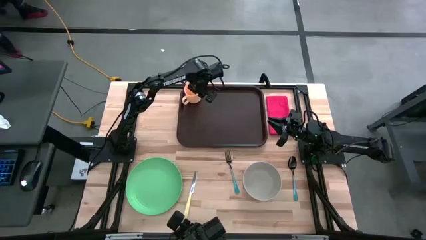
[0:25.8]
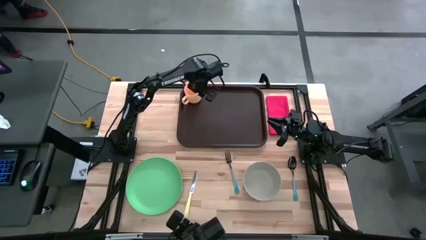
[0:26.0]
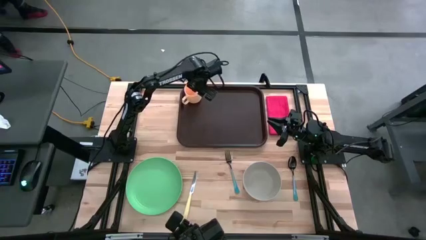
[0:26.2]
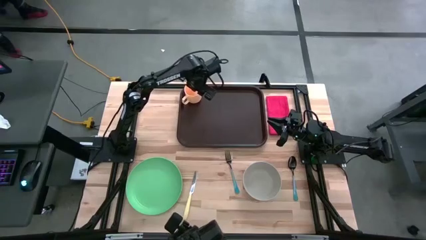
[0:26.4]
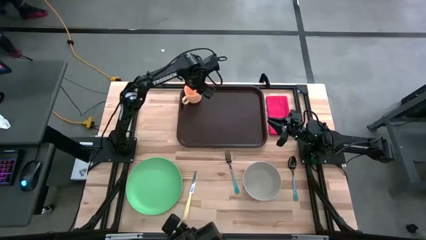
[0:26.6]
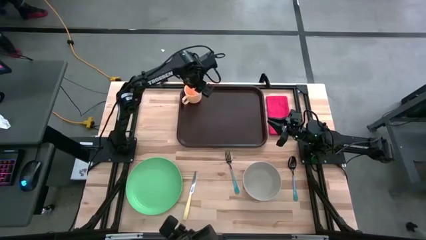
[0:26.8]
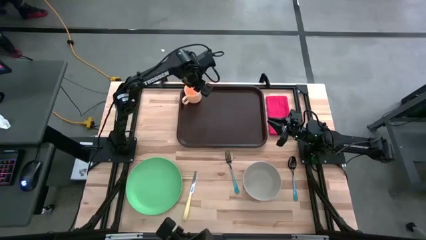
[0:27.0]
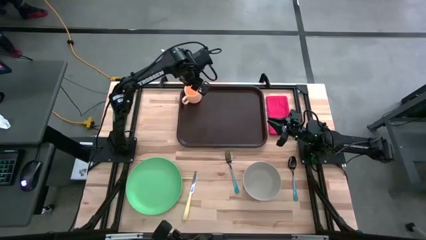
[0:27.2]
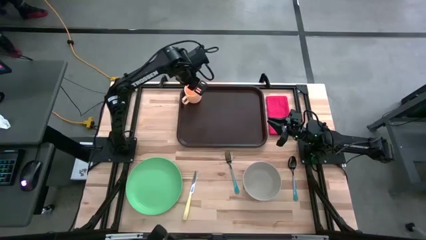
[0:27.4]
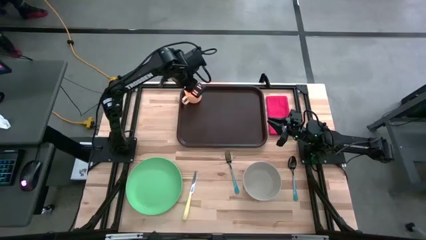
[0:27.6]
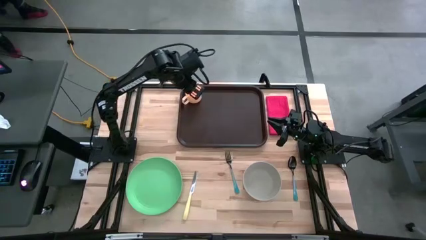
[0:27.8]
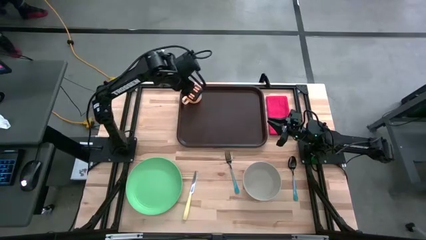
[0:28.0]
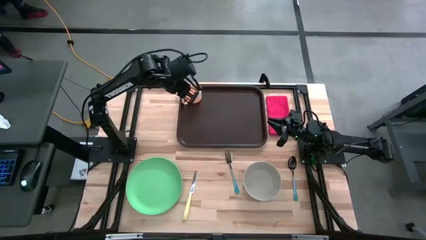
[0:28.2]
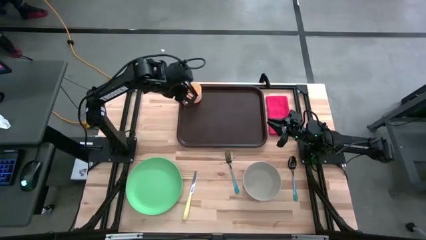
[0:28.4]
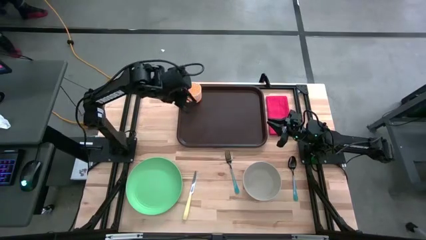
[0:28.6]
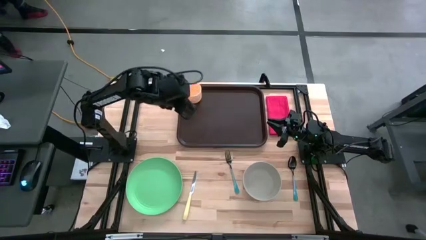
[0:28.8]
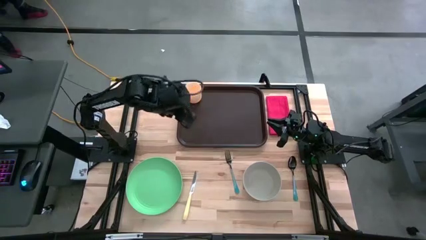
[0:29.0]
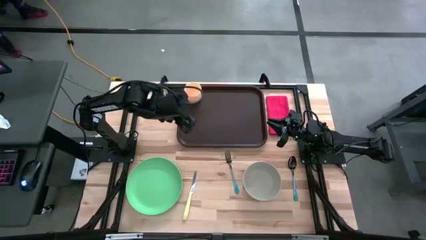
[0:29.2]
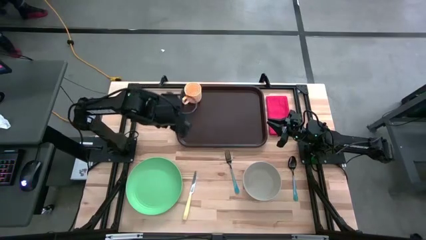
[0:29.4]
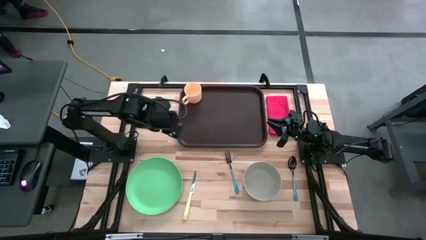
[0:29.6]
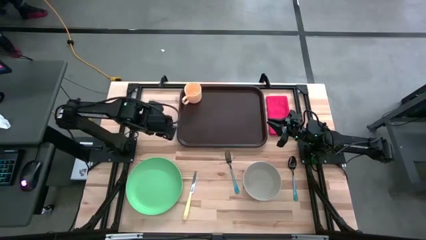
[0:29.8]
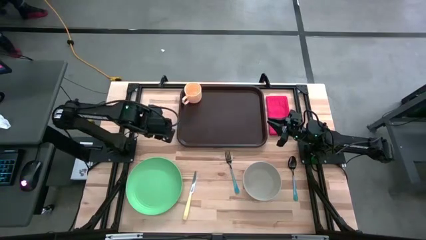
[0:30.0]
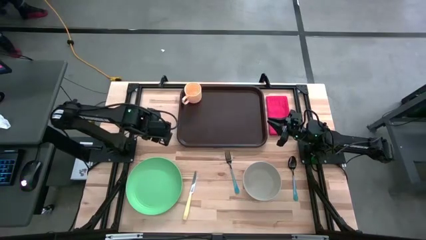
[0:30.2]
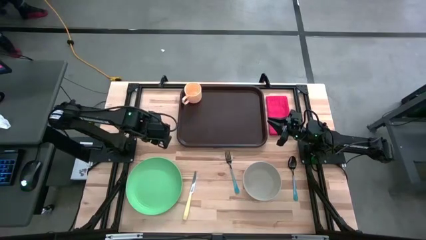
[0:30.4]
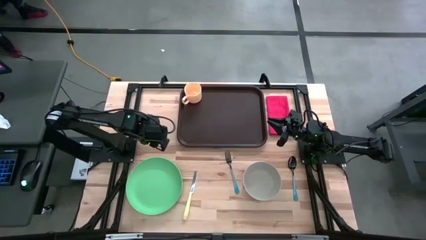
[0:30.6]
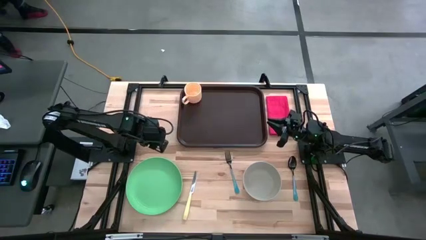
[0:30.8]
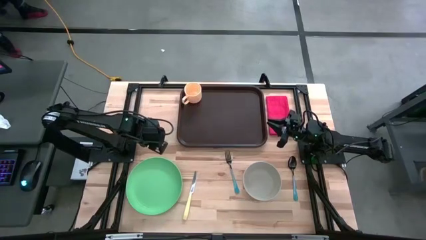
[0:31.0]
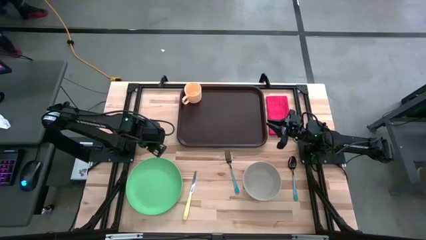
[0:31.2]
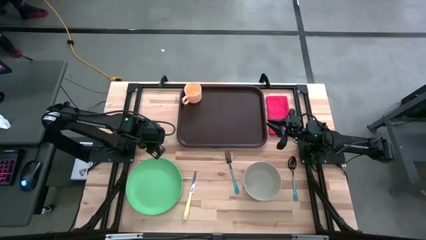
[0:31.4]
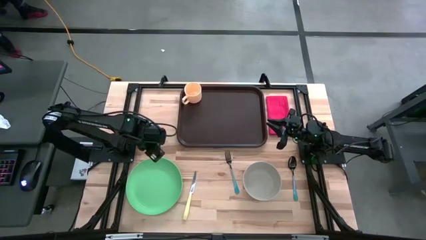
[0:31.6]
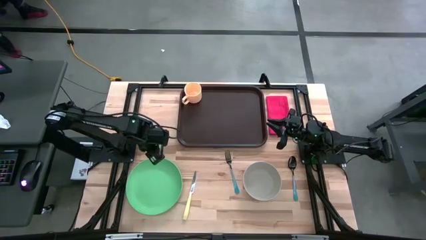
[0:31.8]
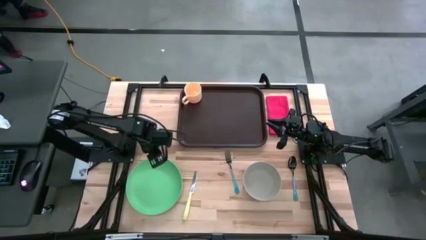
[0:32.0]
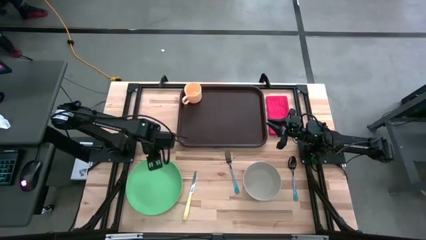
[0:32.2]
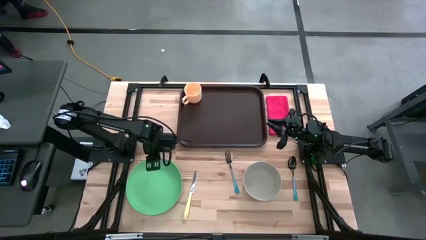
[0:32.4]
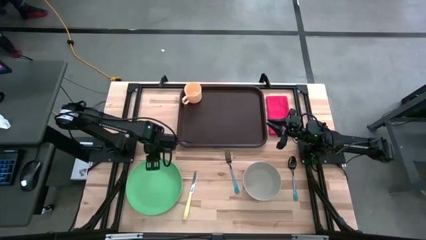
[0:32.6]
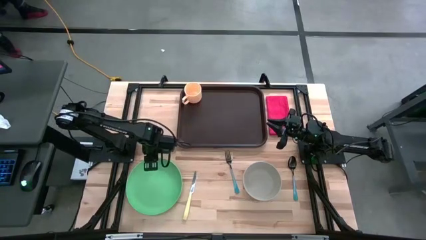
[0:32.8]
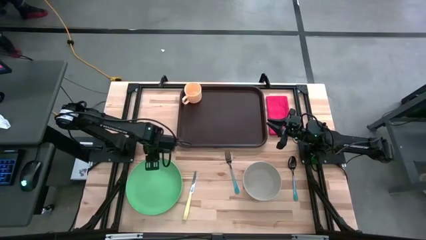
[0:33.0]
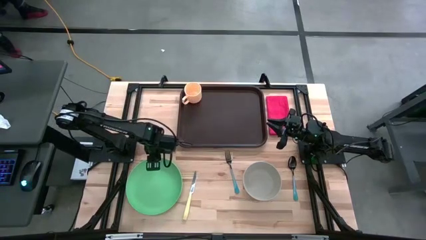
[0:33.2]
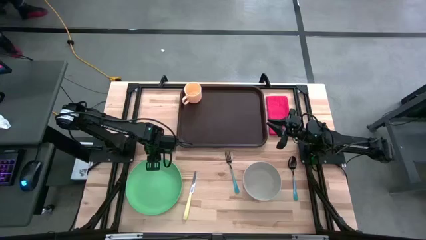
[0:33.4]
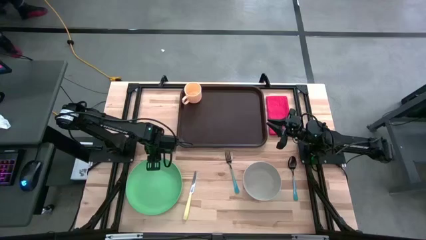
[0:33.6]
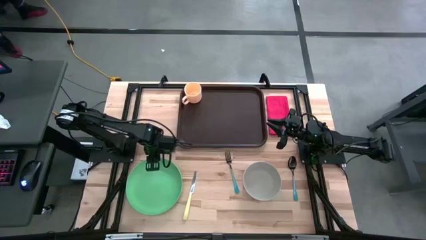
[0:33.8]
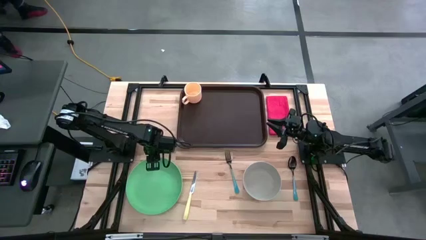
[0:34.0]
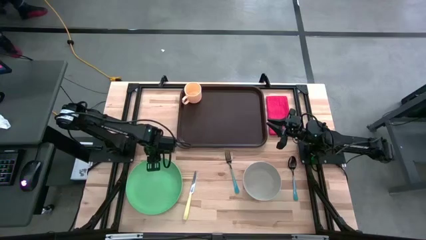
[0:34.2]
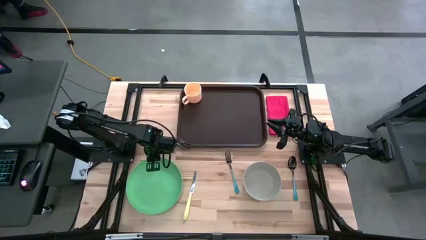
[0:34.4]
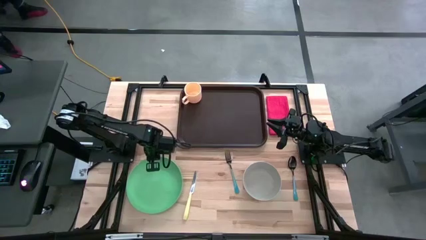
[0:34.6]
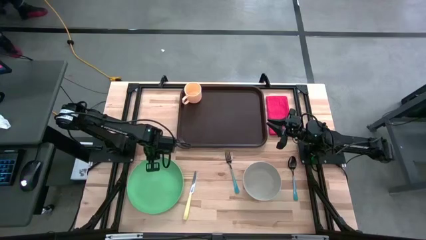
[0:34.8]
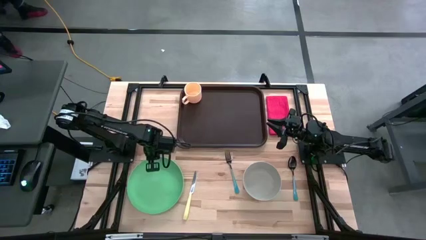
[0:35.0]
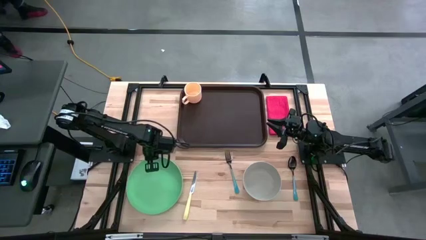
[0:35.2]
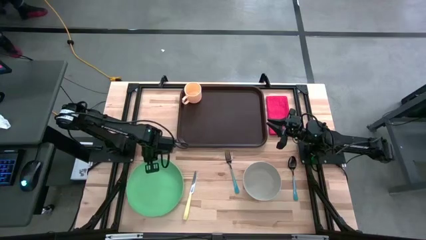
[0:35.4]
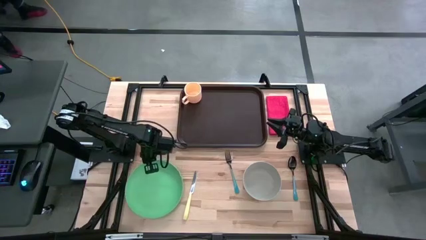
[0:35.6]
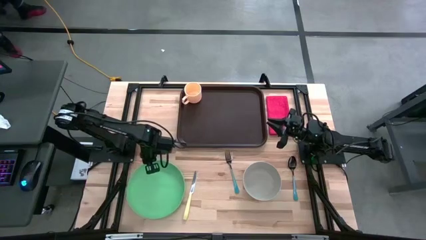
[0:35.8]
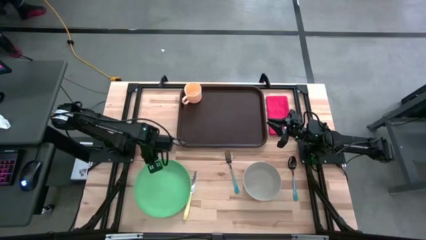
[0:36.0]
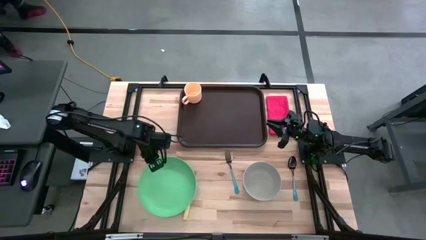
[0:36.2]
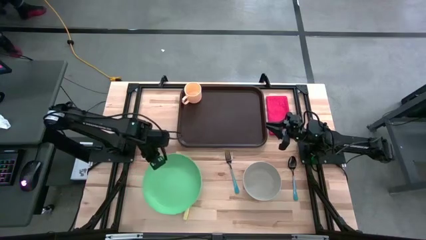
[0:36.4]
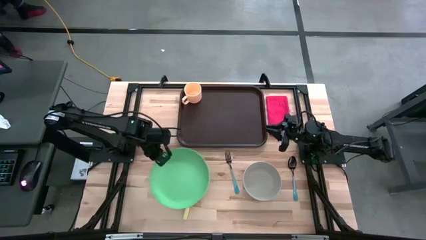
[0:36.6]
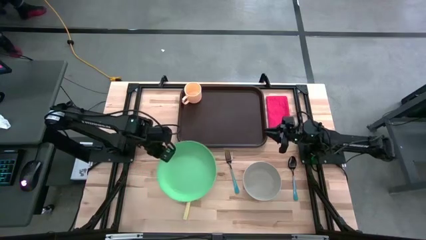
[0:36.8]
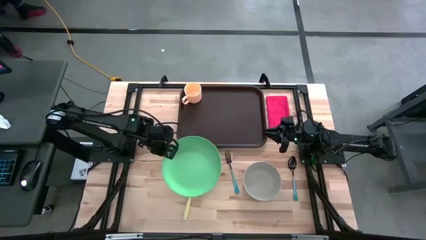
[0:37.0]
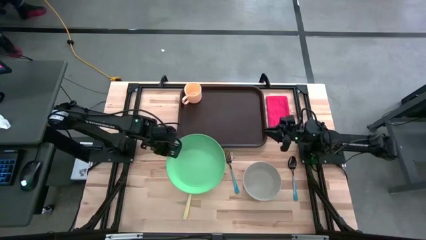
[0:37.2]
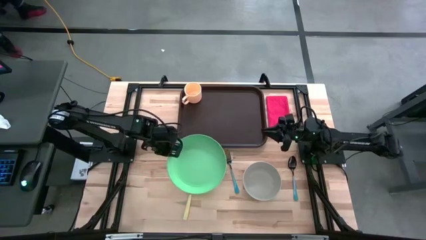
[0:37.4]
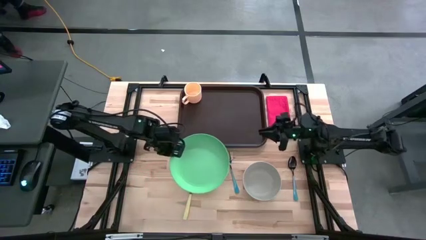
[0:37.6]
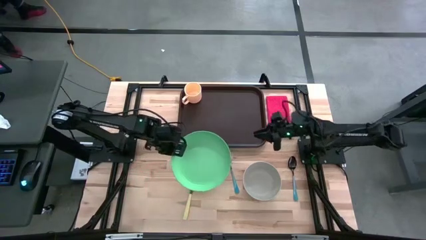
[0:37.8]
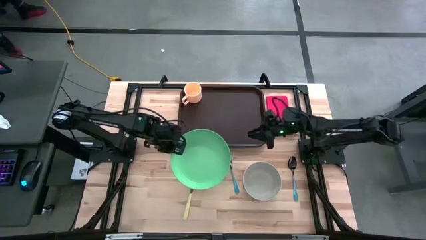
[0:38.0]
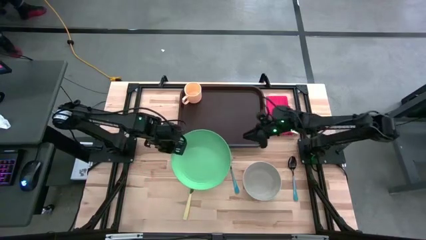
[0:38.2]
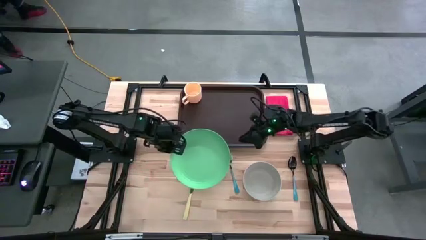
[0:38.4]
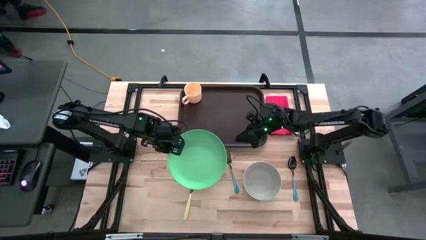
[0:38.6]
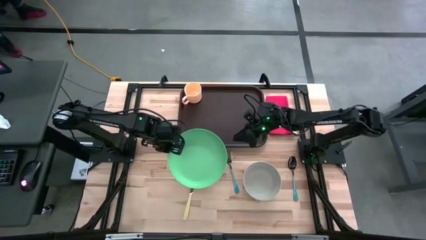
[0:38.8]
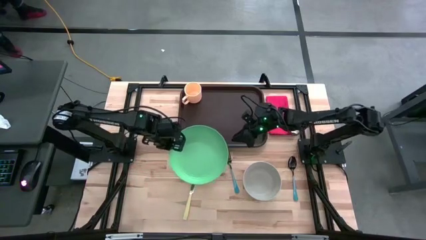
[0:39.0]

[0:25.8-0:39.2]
Task: Set up tray
Put the green plate on the brown serving tray to the bottom right of the yellow mug
